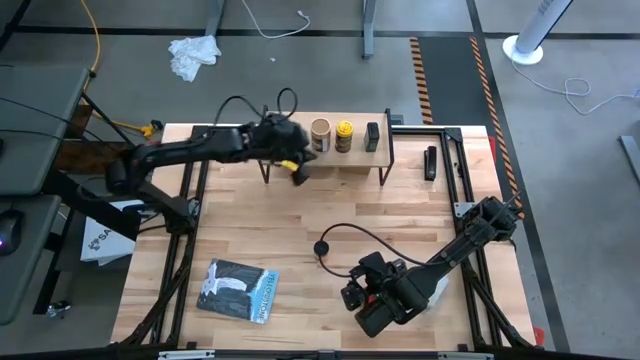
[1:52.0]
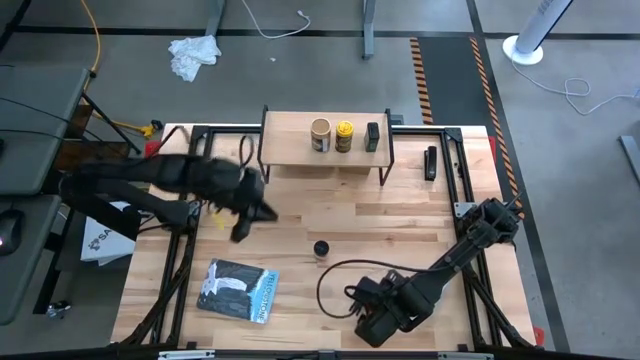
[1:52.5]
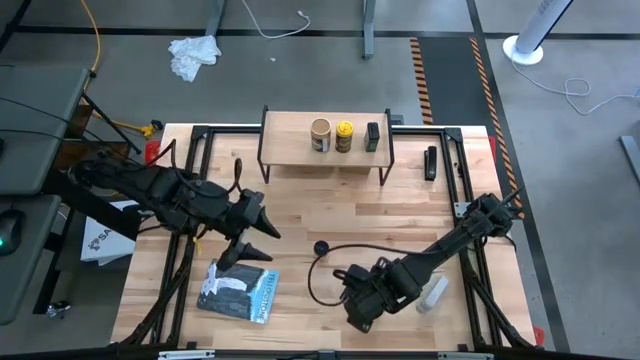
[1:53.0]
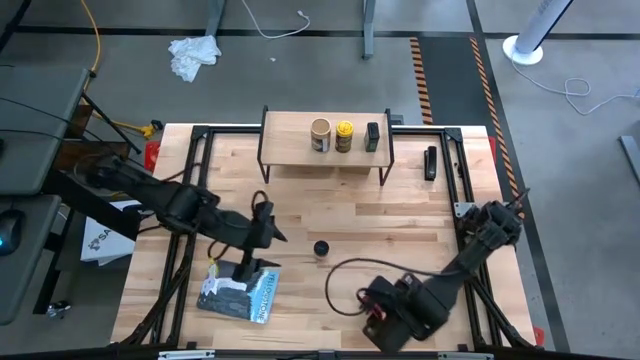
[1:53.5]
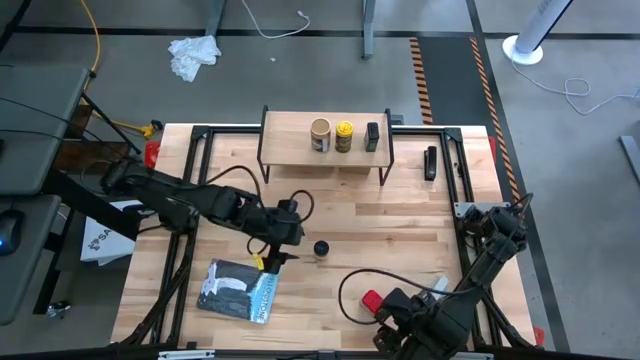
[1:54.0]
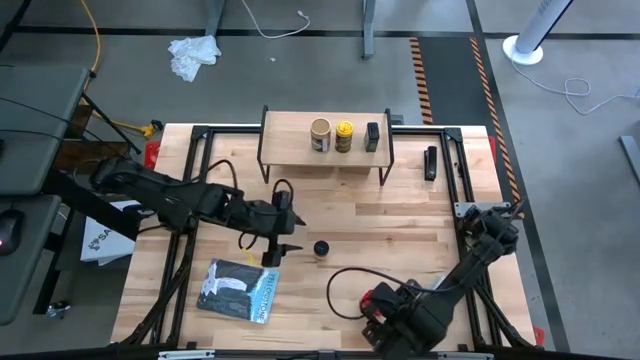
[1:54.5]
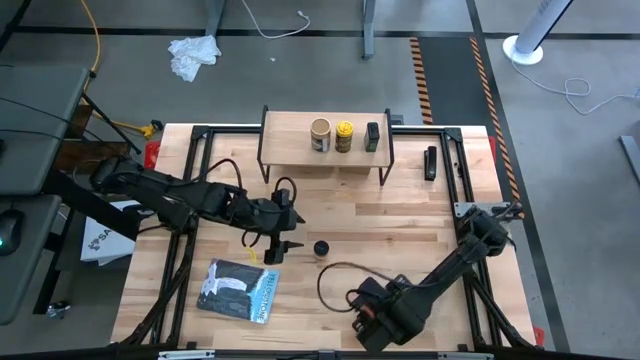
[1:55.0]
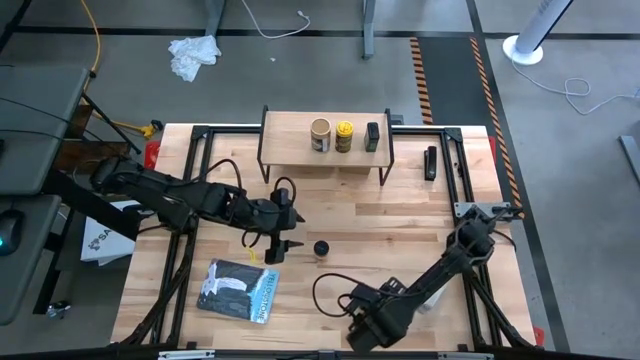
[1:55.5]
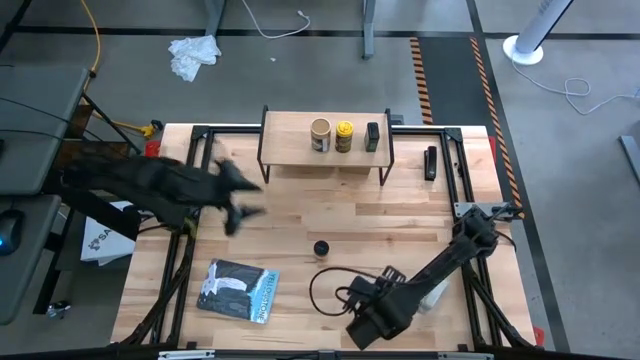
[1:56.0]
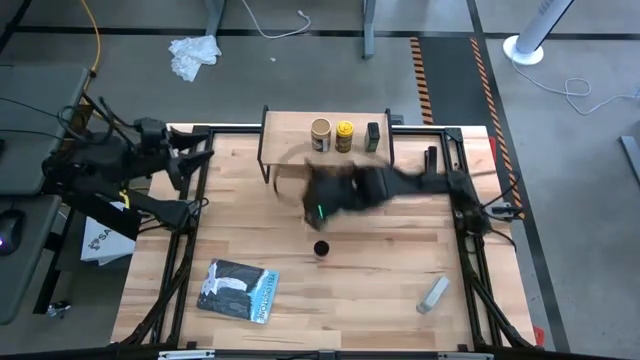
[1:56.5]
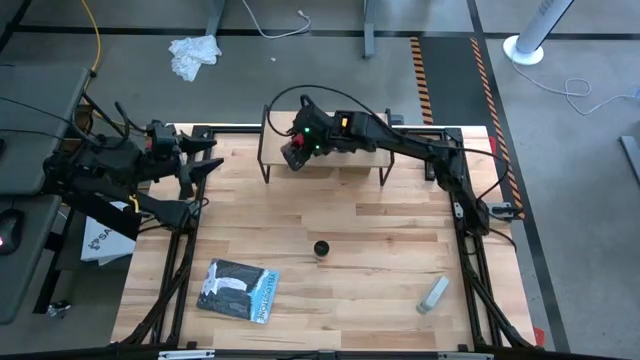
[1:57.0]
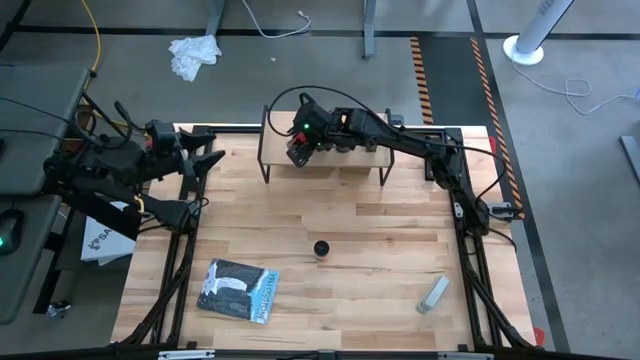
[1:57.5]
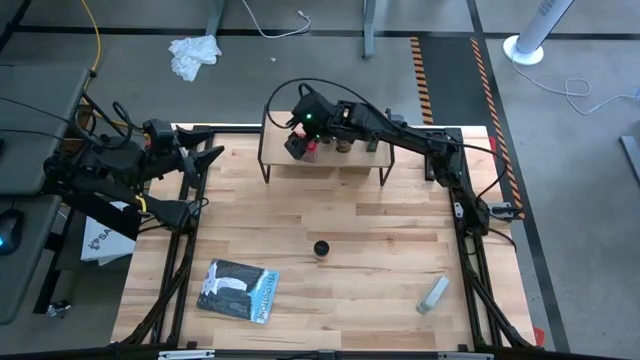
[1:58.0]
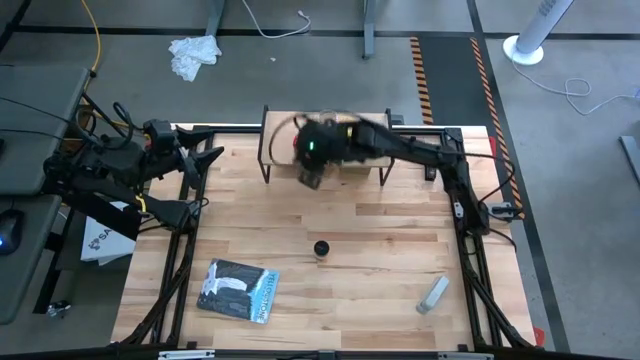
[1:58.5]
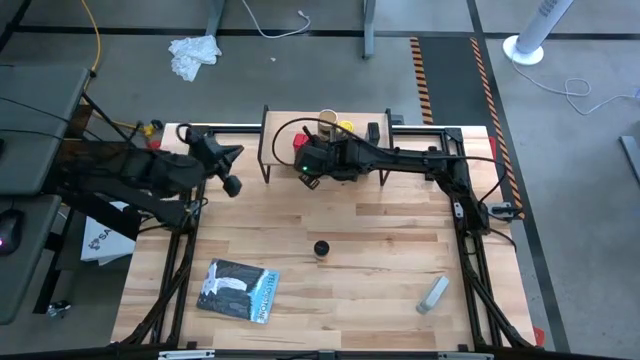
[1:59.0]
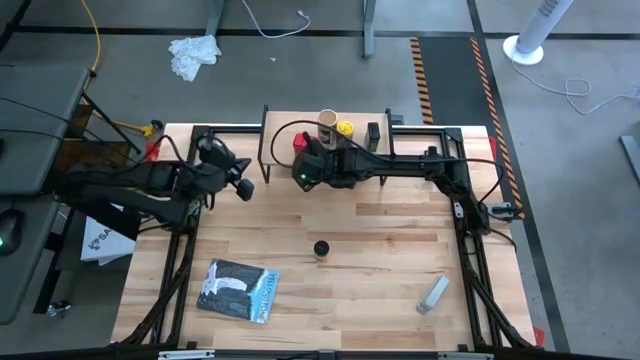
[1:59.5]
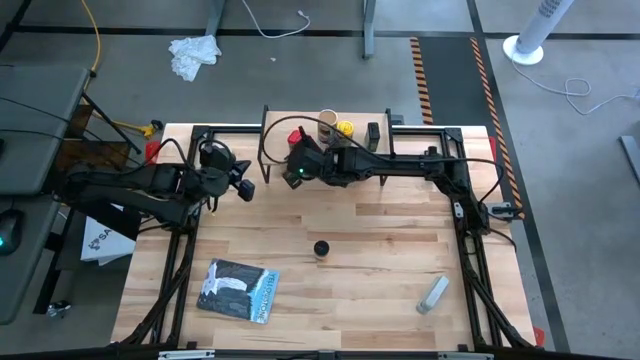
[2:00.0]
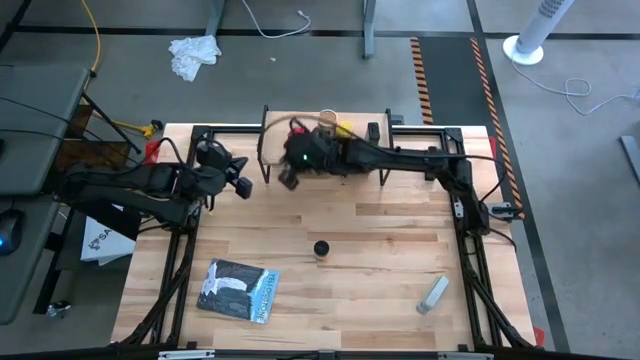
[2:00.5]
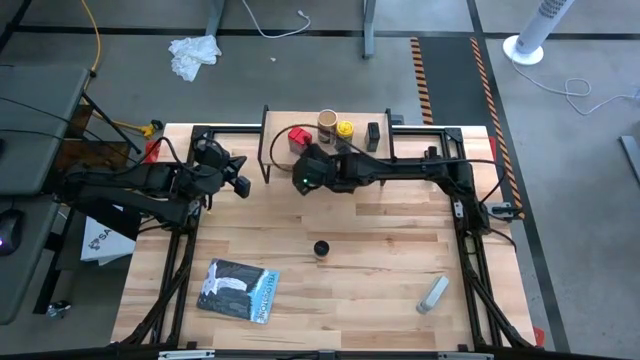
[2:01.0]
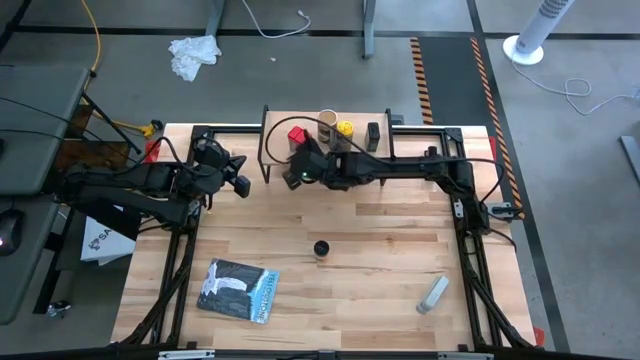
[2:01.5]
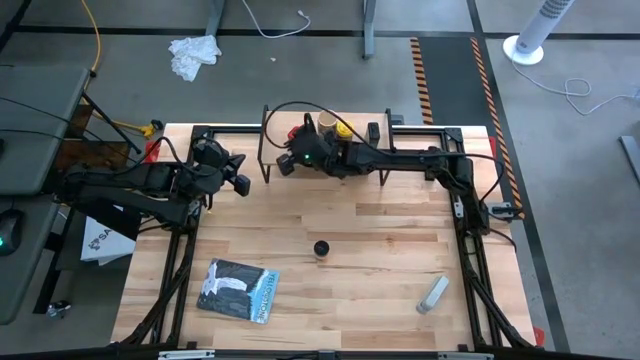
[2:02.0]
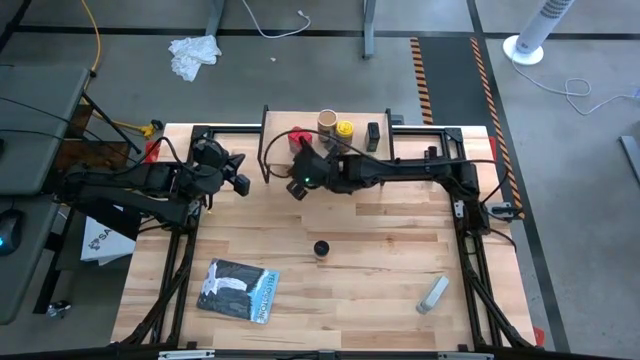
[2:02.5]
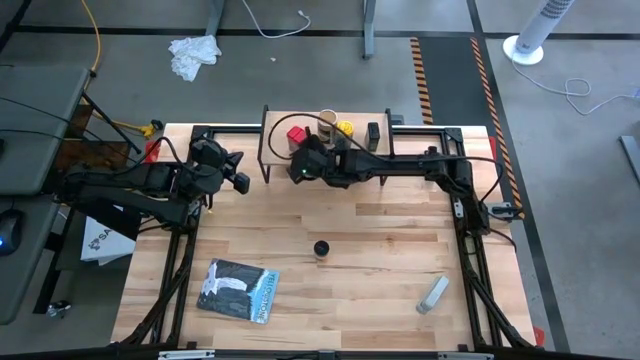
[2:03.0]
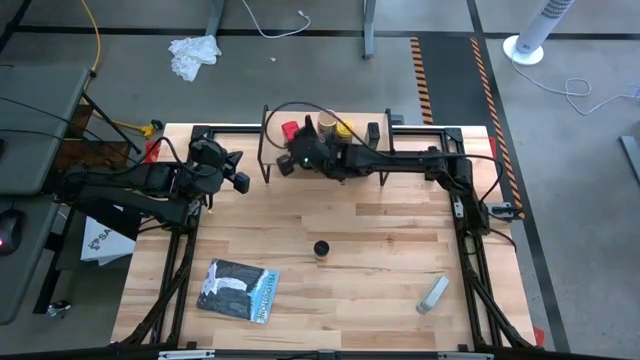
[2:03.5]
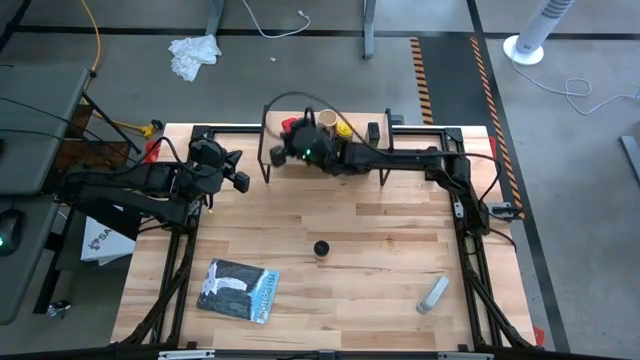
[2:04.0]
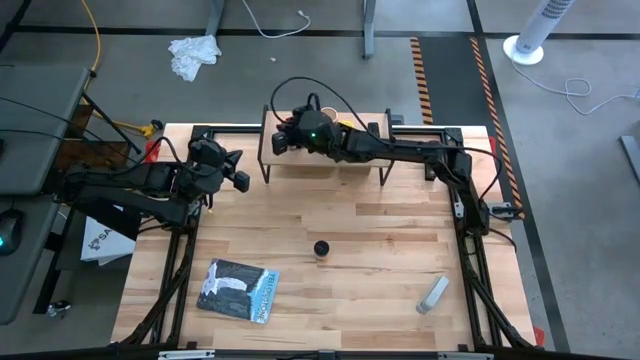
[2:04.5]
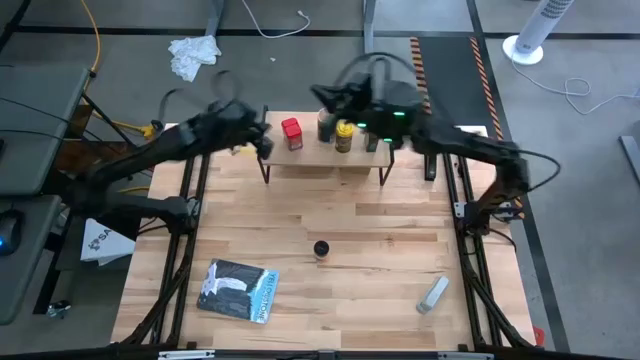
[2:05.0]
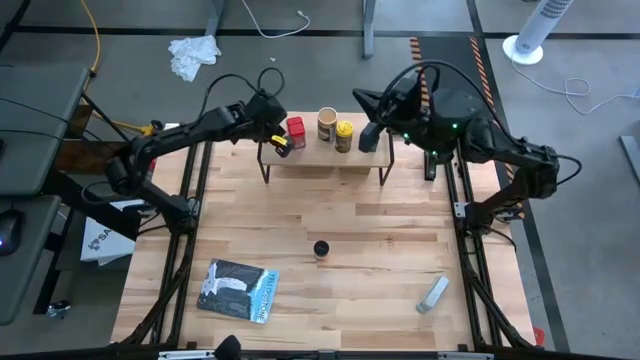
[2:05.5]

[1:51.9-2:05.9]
Task: Shelf spices
Put the red seasoning can on the shelf

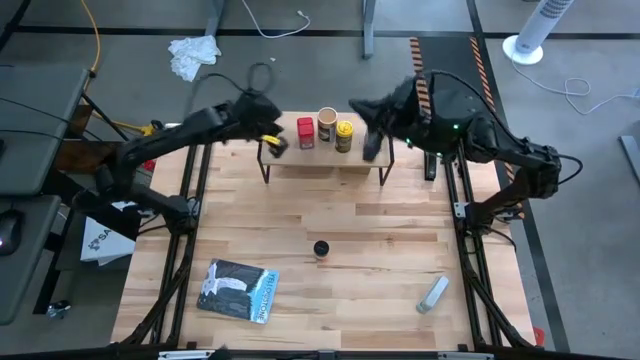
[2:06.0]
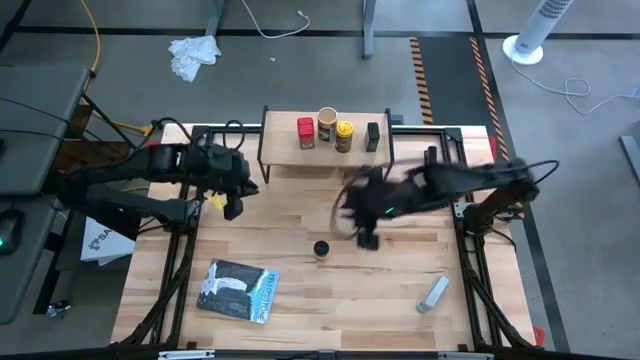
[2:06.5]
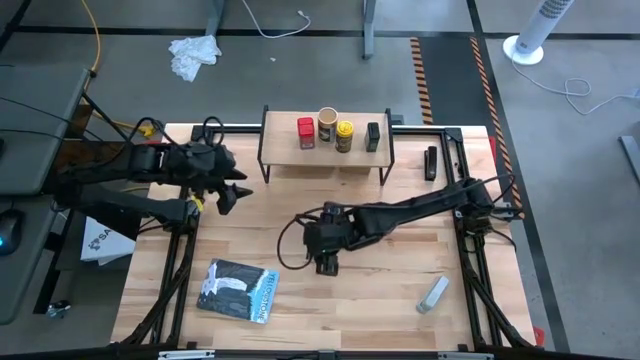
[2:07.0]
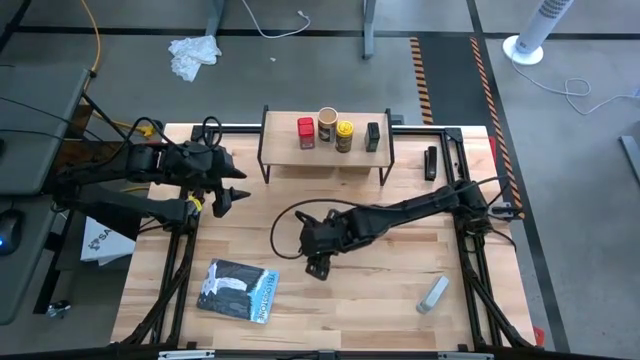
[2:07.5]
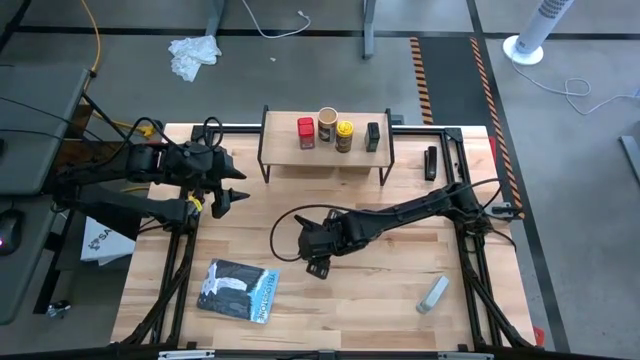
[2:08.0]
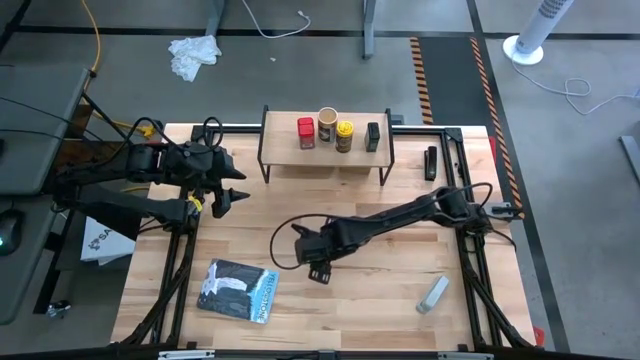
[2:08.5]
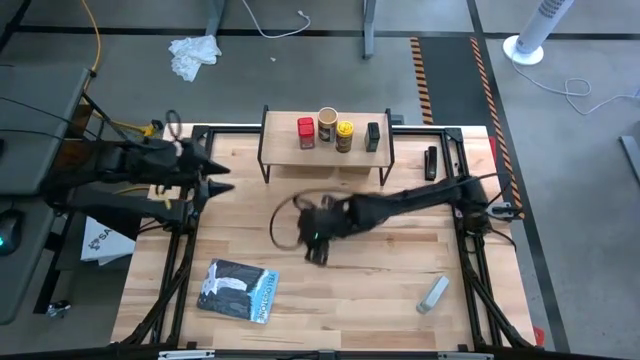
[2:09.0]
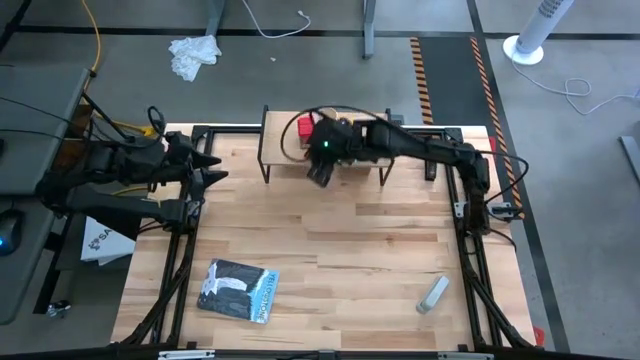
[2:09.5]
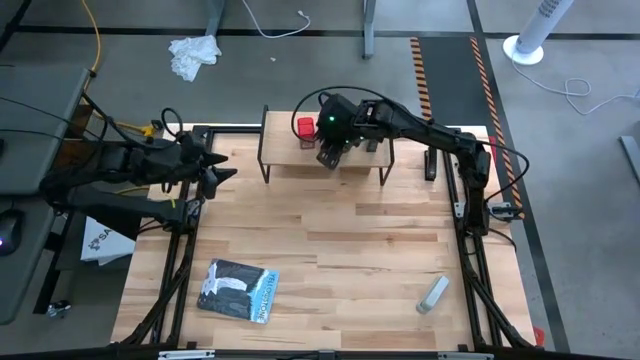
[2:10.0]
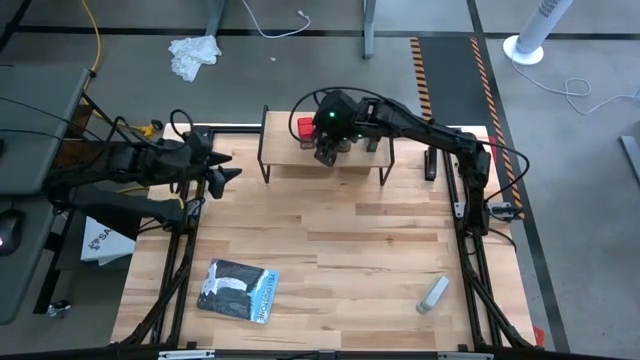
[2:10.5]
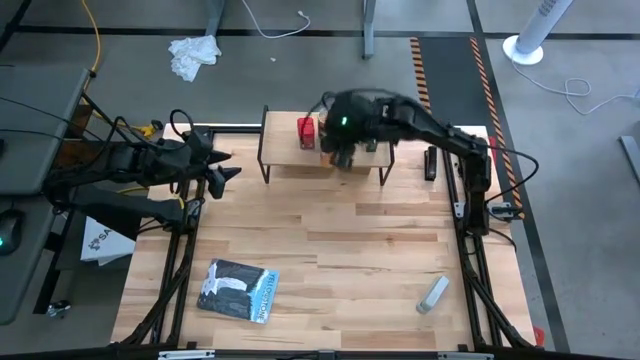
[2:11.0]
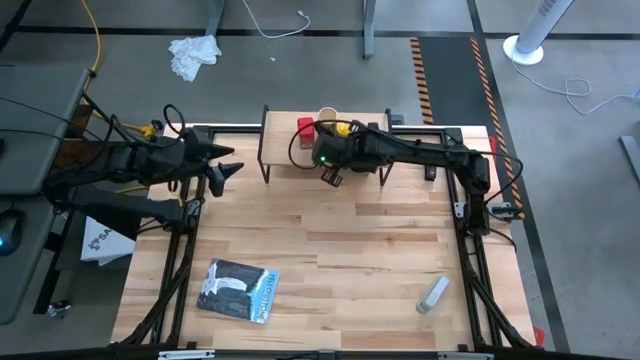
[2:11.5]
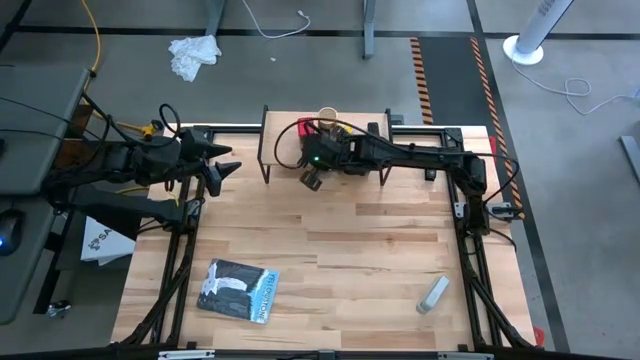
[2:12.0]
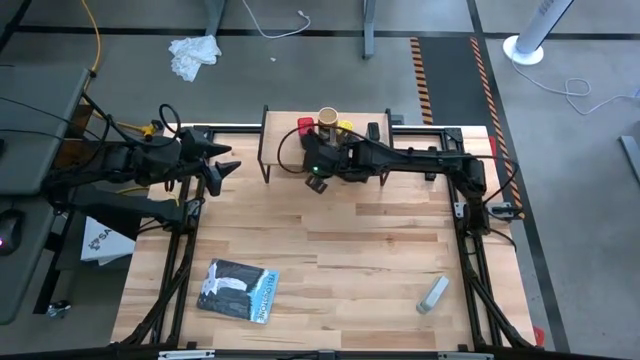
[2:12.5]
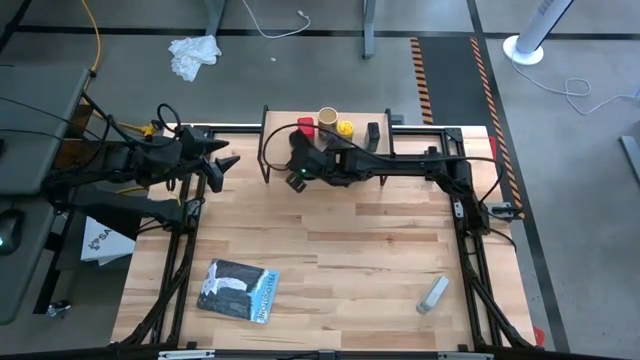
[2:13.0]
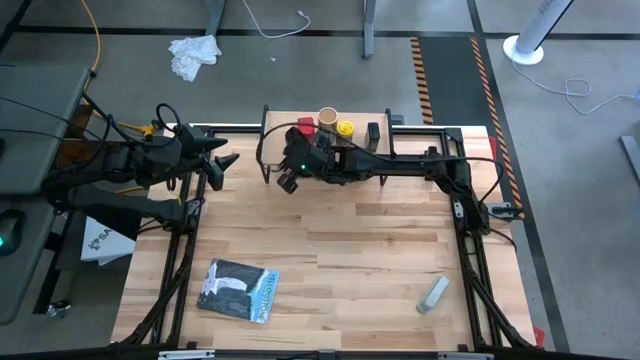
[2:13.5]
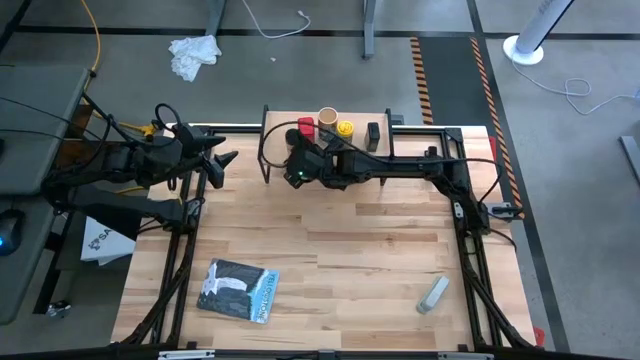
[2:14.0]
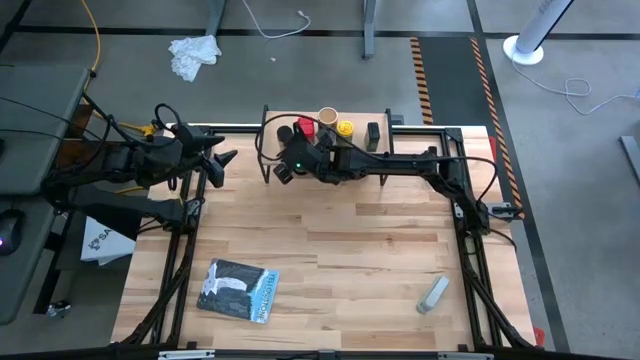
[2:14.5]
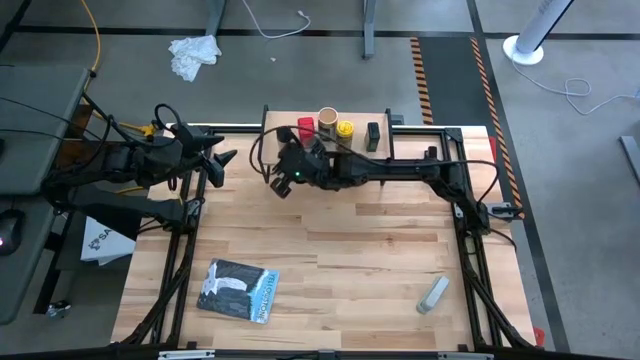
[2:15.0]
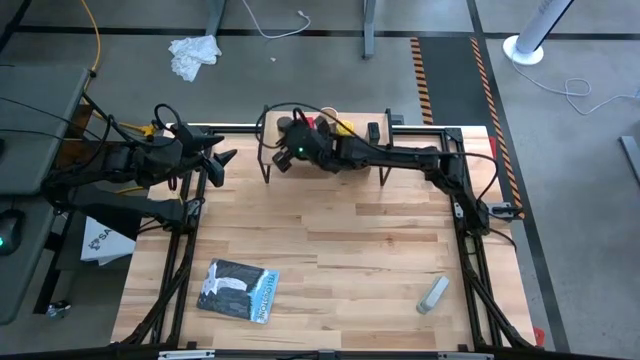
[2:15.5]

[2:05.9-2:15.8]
Put the black seasoning bottle on the shelf
